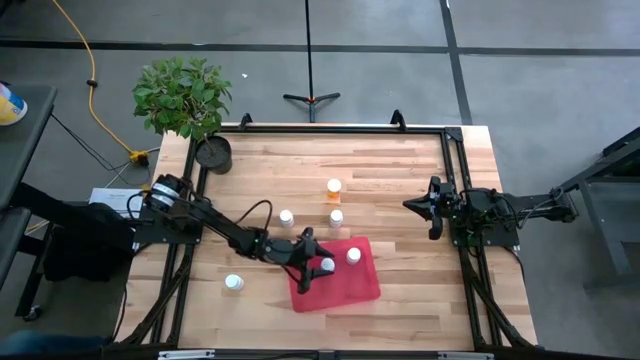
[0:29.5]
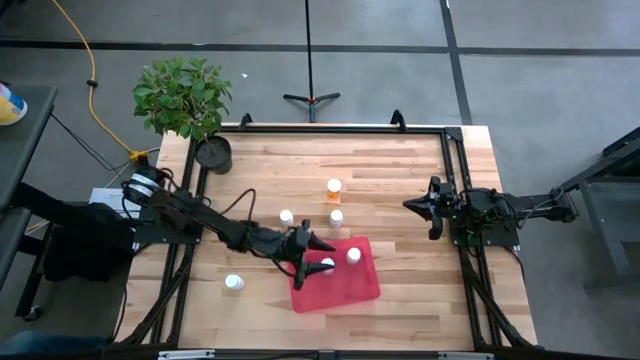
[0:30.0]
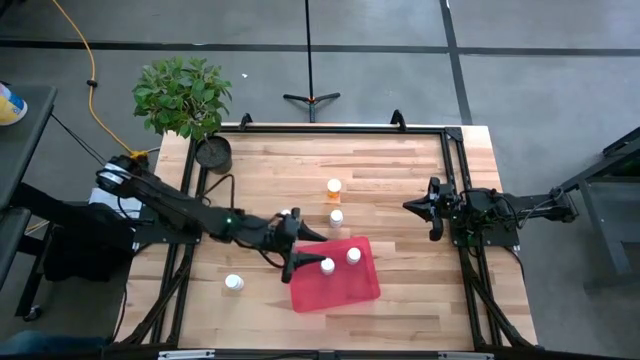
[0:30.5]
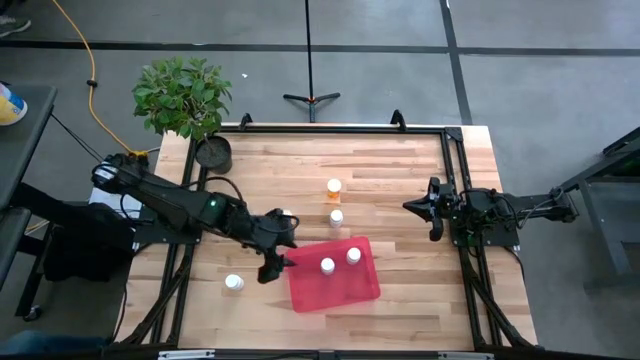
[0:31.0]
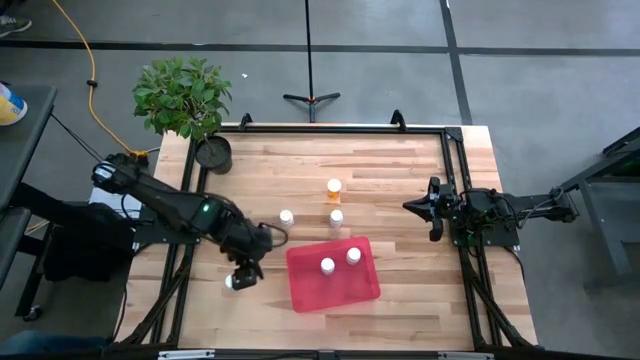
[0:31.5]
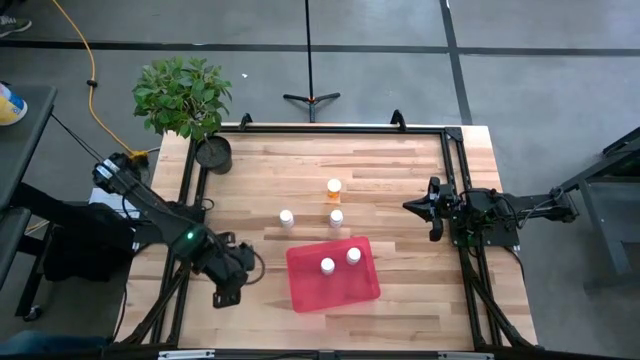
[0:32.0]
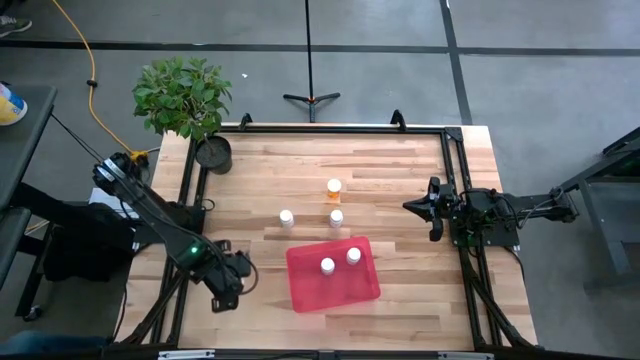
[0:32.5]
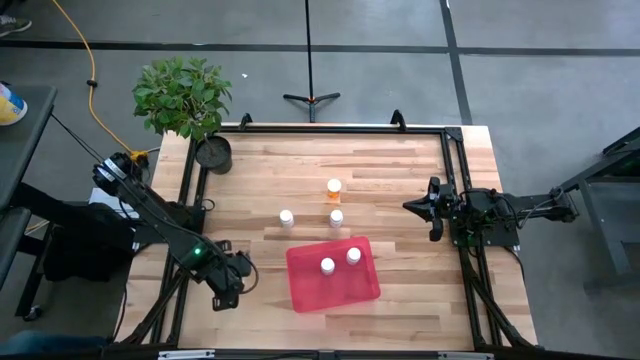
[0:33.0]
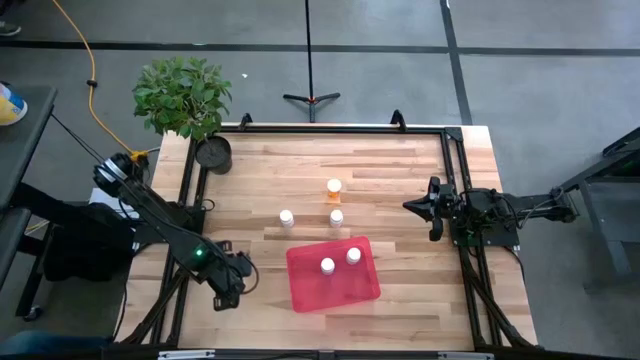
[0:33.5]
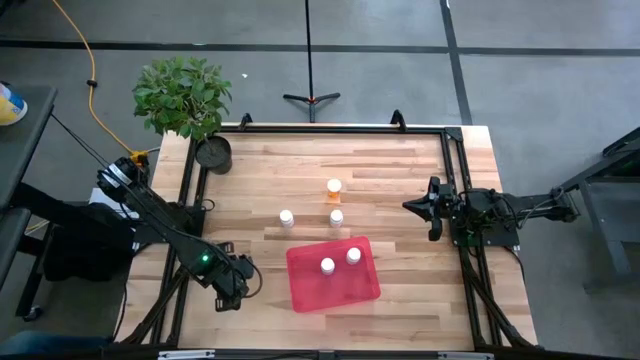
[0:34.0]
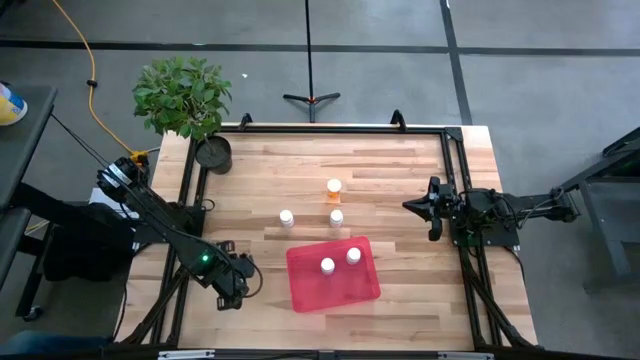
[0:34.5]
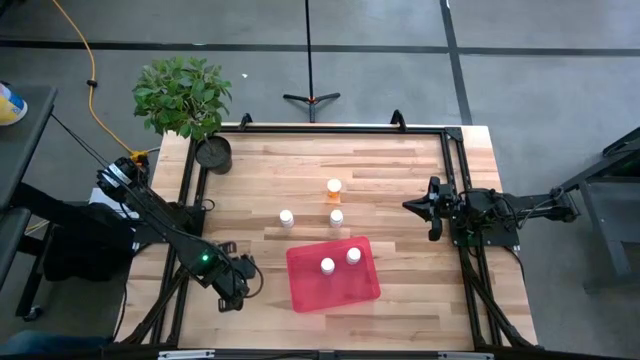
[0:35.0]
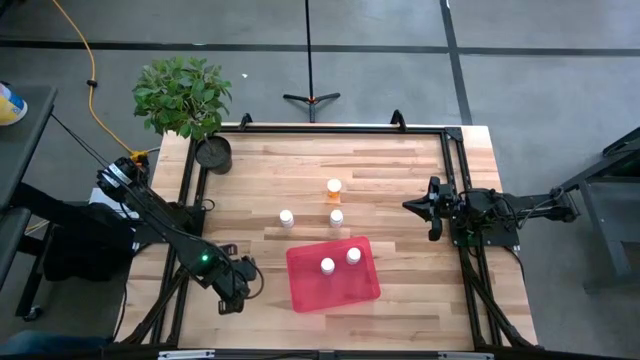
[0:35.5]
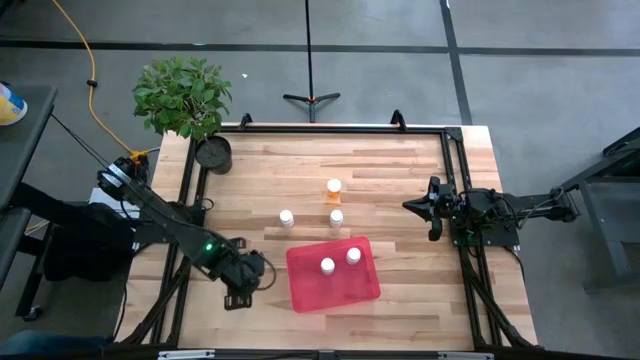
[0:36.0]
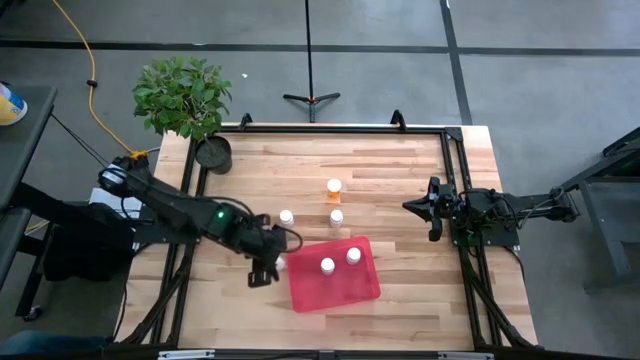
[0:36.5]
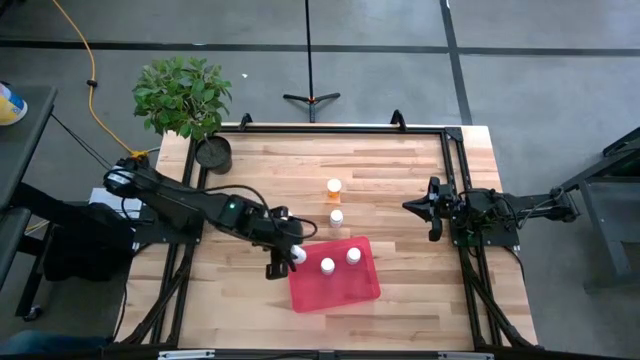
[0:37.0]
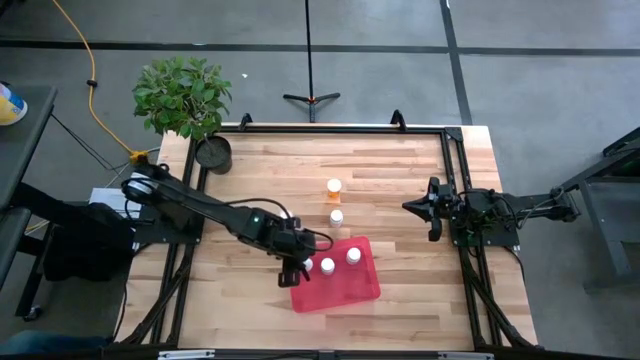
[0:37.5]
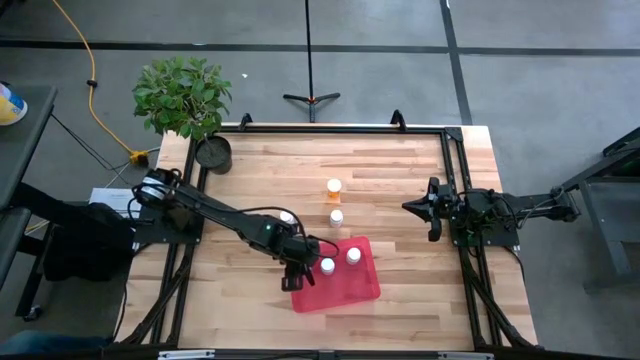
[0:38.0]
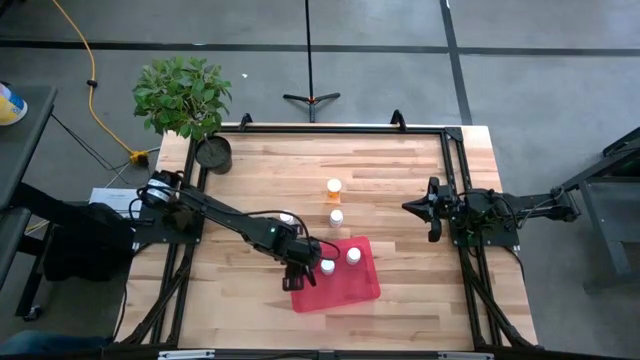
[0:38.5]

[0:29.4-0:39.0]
Task: Pick and place pill bottles into a basket
Put the white pill bottle into the bin

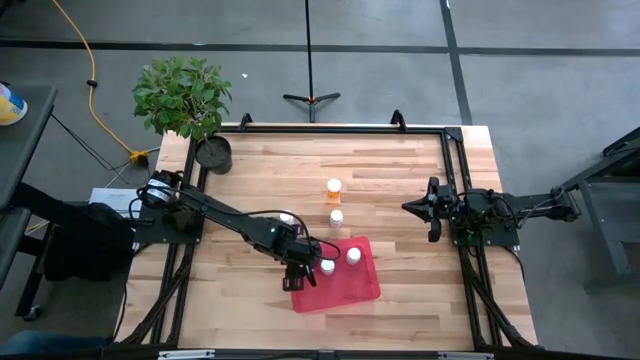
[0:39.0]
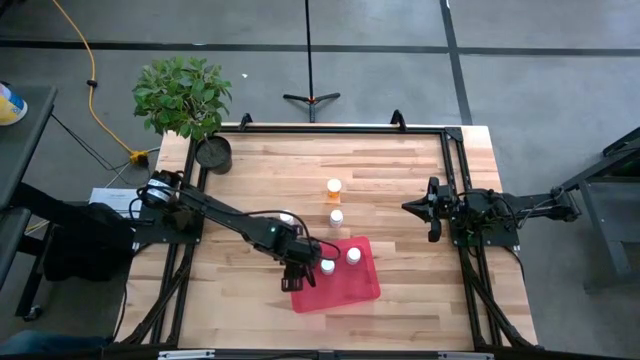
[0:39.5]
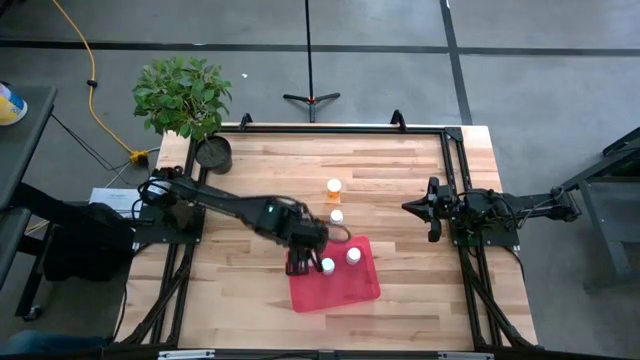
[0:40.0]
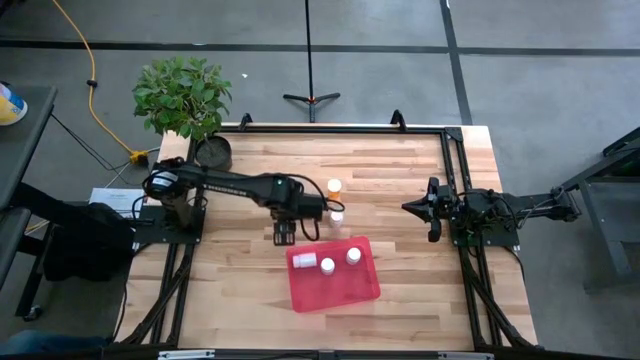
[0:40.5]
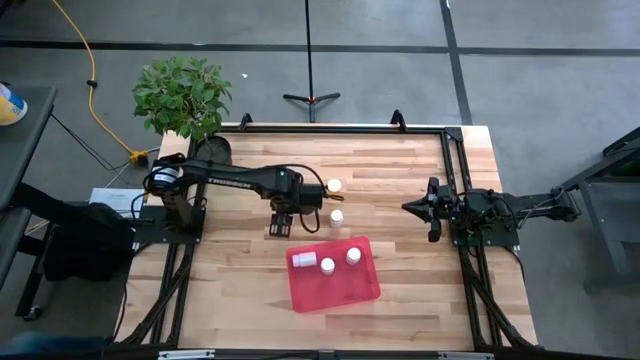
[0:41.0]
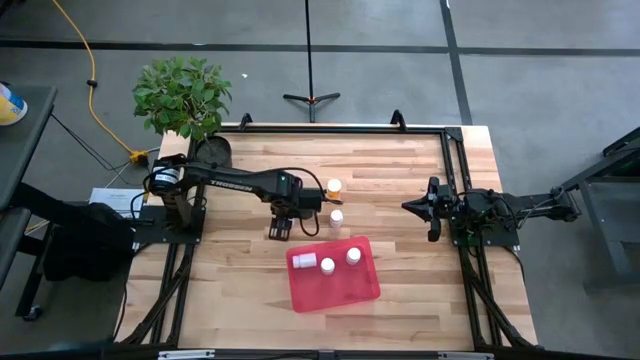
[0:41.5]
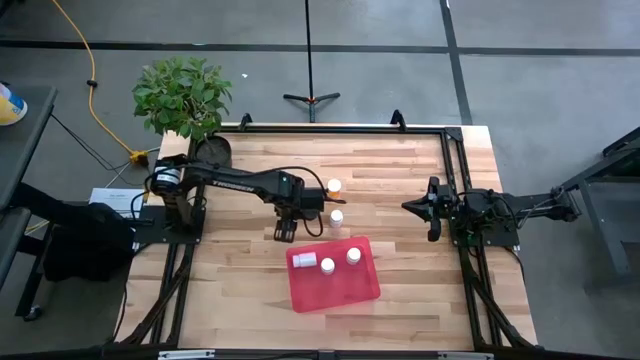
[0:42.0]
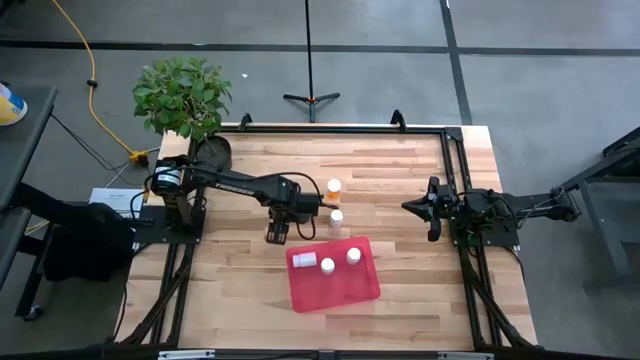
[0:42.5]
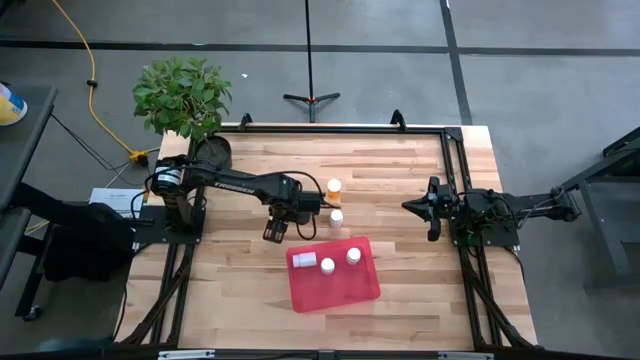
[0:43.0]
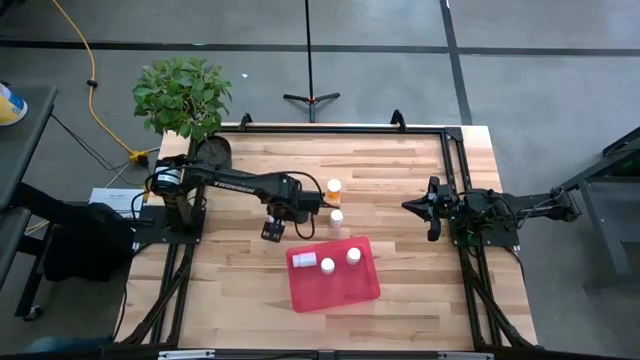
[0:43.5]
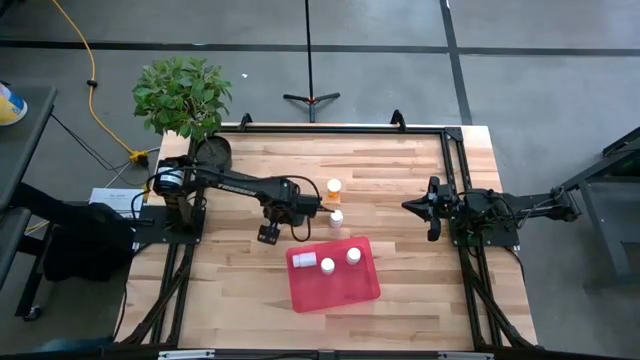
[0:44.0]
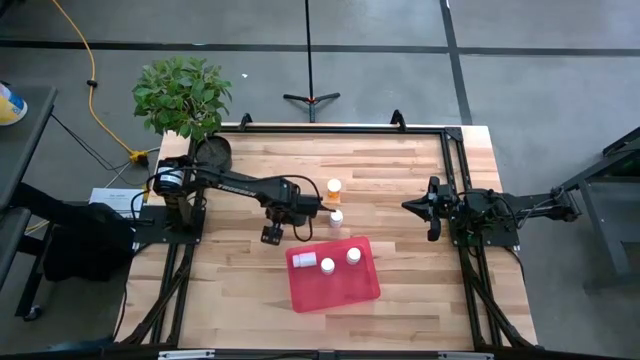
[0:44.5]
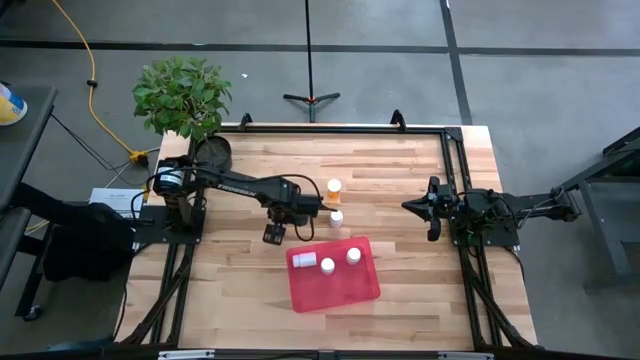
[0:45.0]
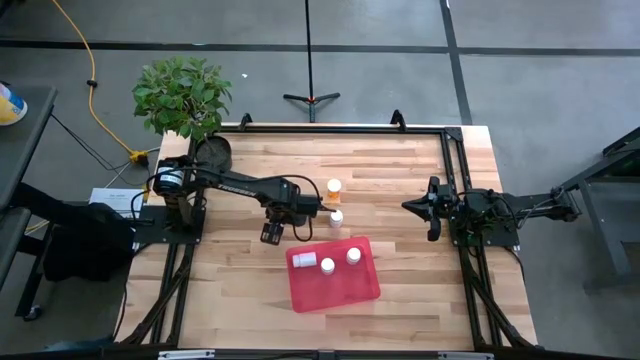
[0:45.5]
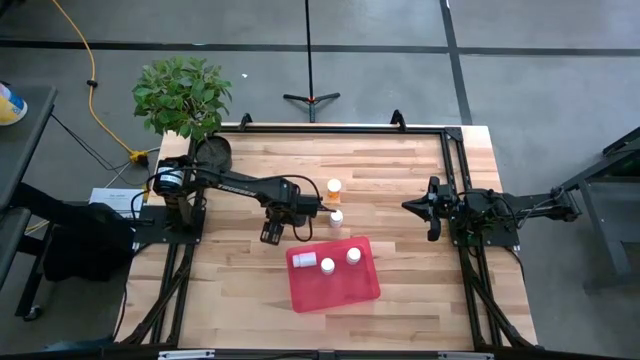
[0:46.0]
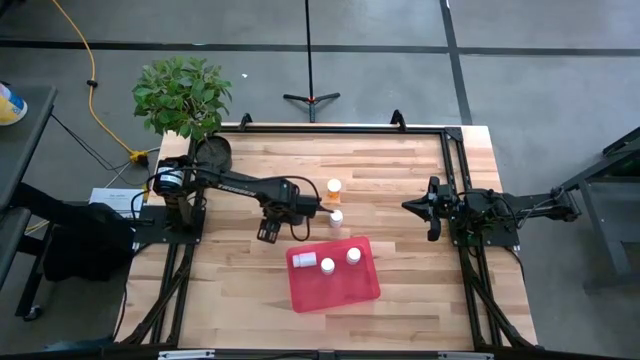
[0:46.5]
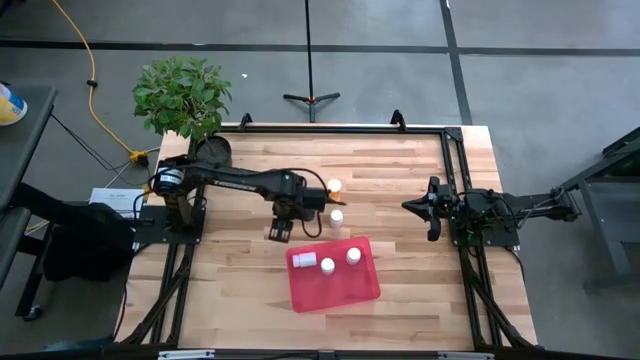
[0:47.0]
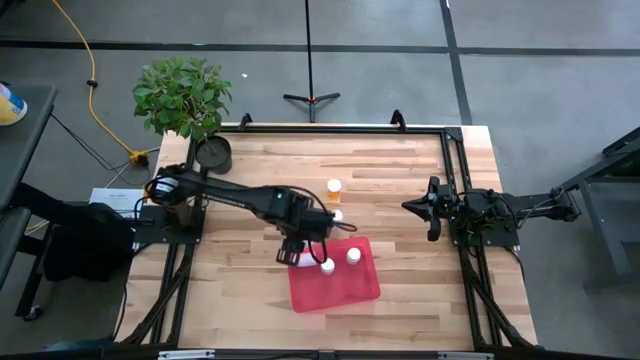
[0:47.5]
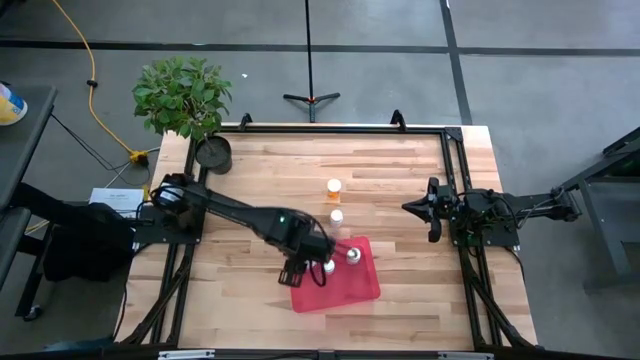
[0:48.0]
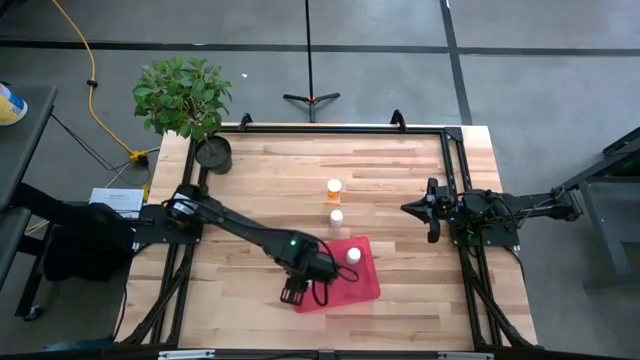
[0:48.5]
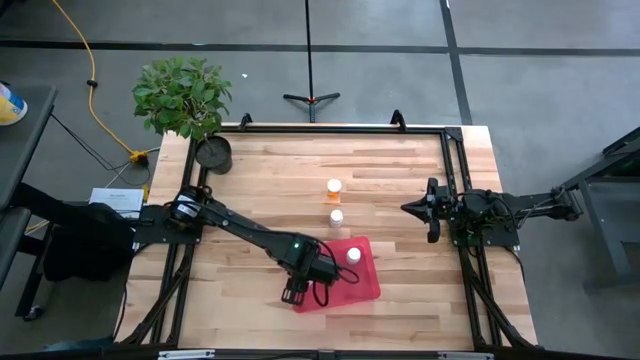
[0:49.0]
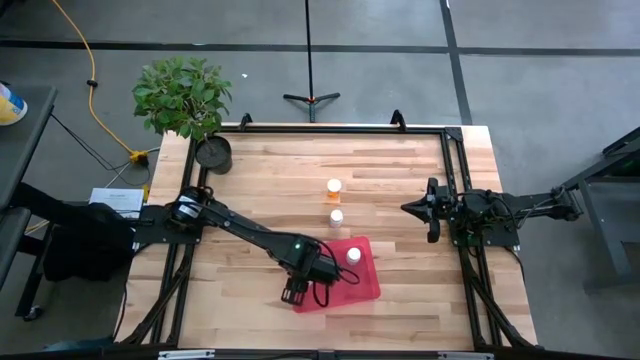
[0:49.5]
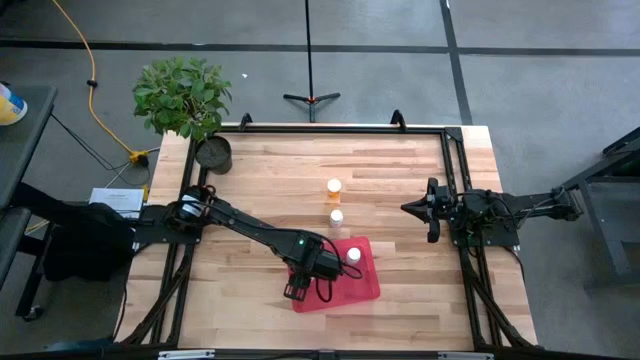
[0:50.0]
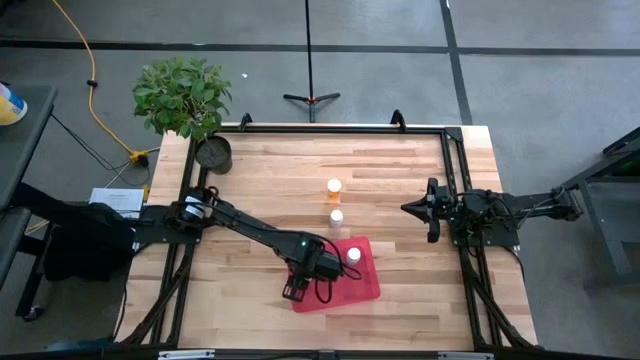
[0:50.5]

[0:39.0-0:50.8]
Put the white pill bottle into the bin
